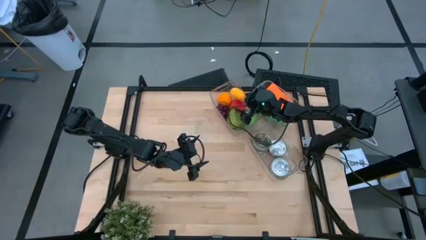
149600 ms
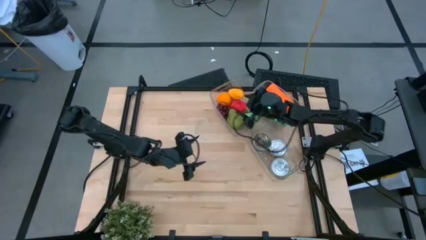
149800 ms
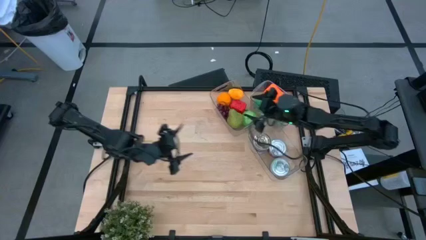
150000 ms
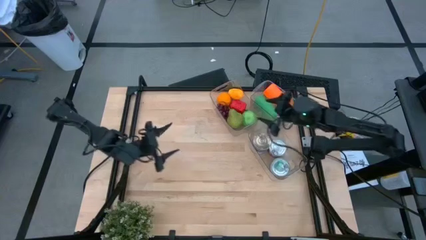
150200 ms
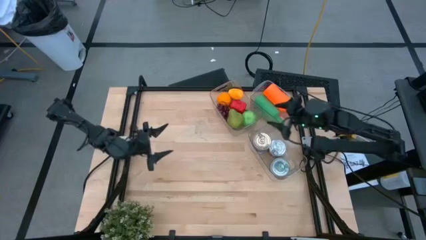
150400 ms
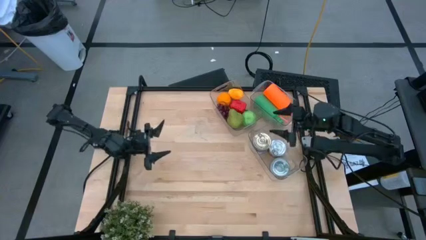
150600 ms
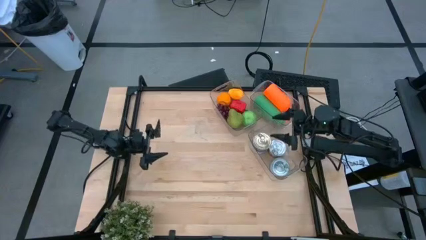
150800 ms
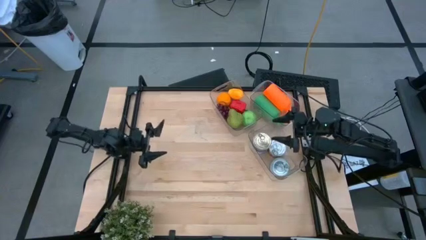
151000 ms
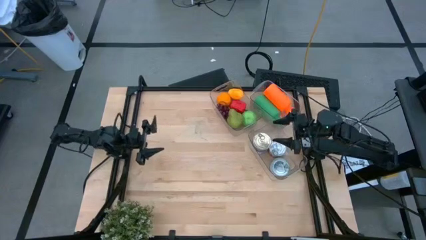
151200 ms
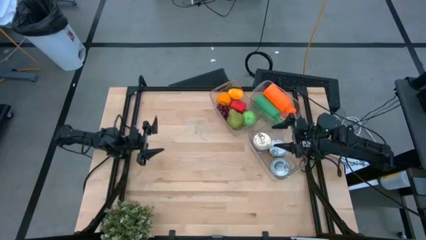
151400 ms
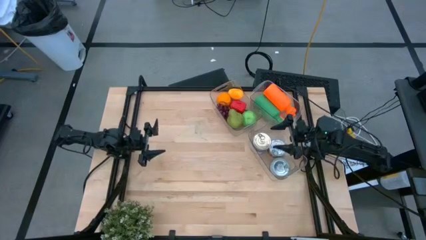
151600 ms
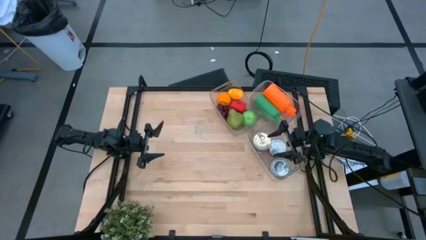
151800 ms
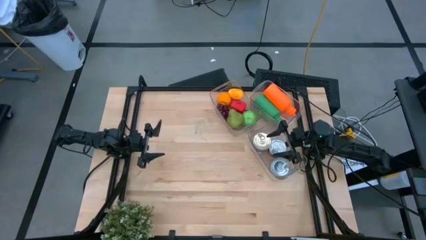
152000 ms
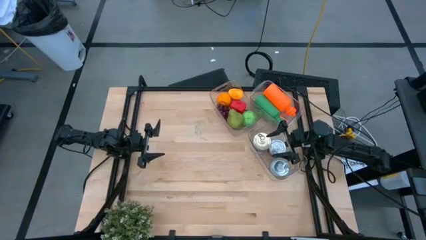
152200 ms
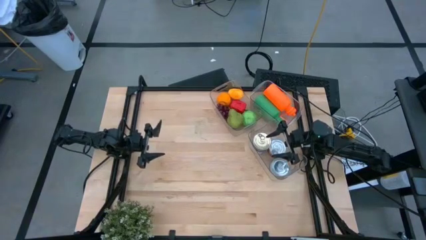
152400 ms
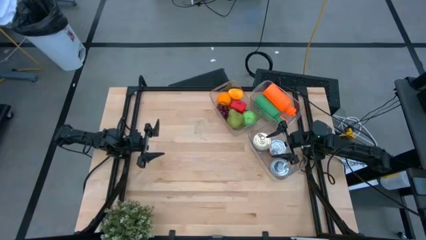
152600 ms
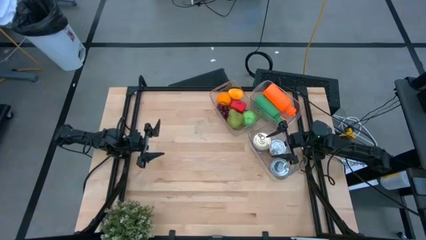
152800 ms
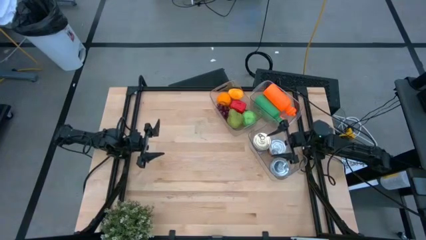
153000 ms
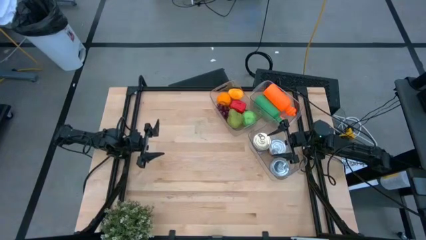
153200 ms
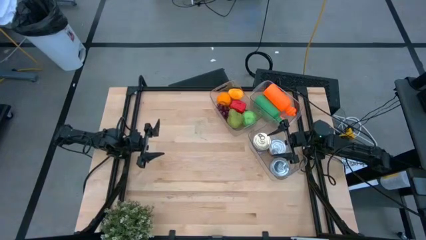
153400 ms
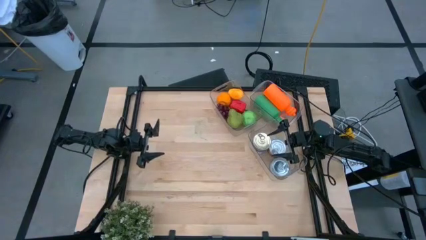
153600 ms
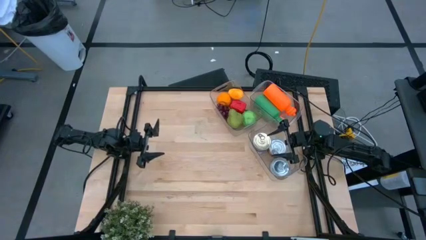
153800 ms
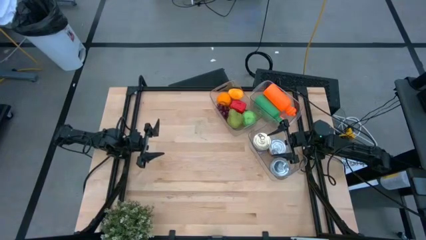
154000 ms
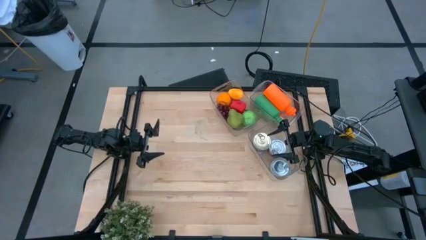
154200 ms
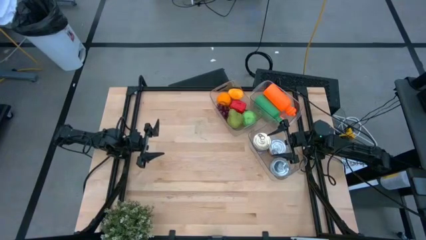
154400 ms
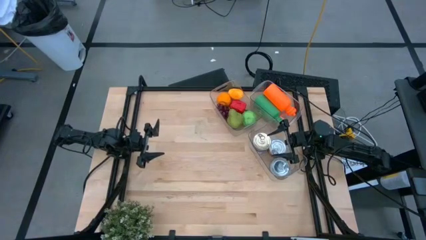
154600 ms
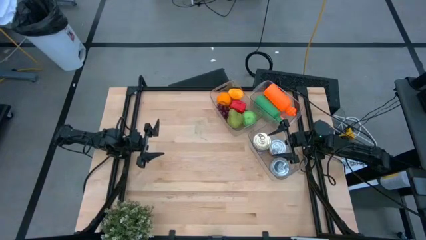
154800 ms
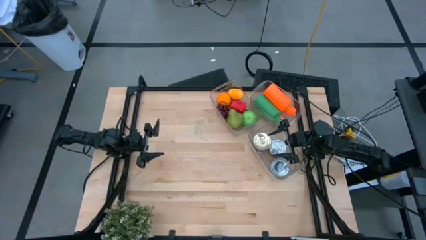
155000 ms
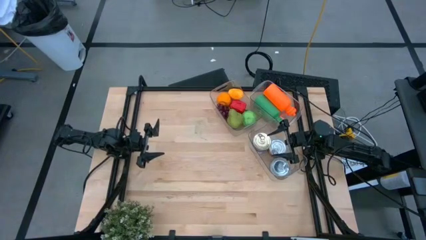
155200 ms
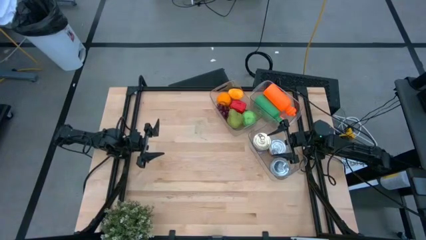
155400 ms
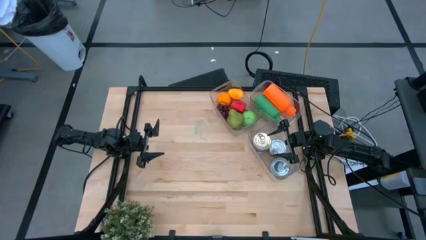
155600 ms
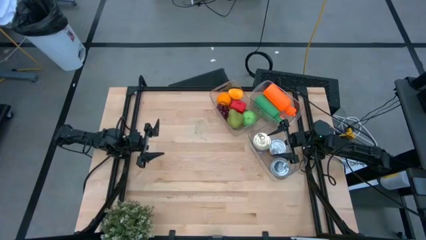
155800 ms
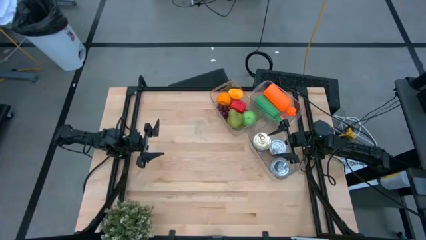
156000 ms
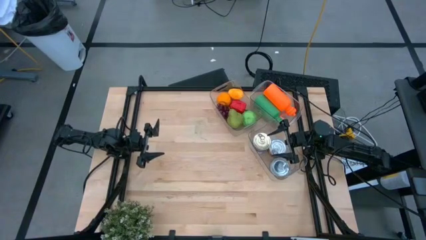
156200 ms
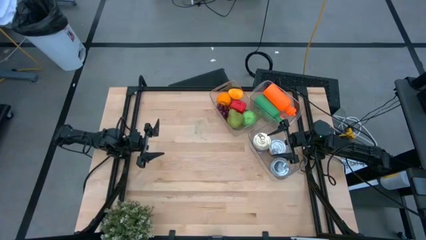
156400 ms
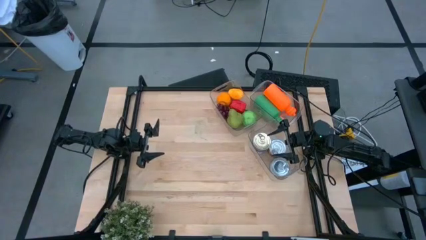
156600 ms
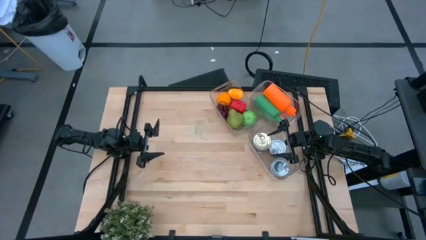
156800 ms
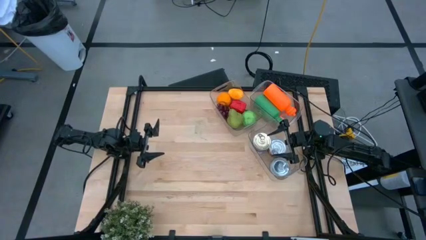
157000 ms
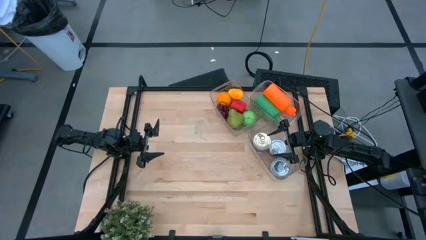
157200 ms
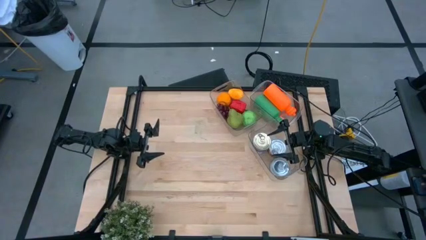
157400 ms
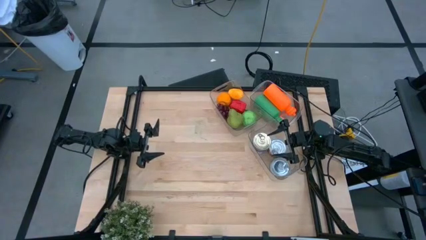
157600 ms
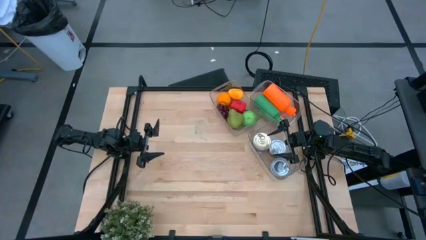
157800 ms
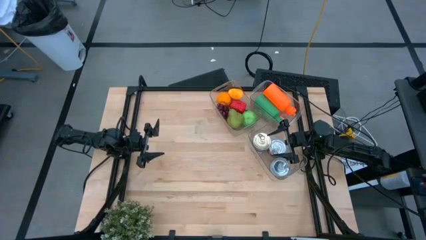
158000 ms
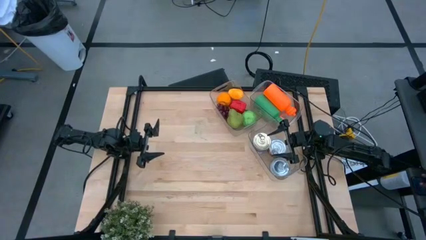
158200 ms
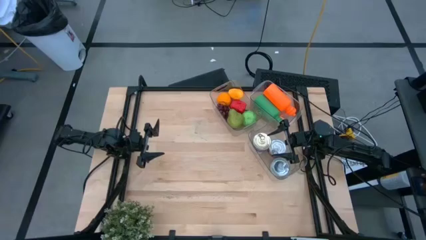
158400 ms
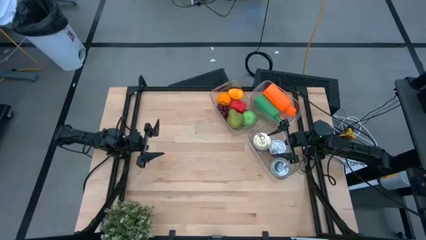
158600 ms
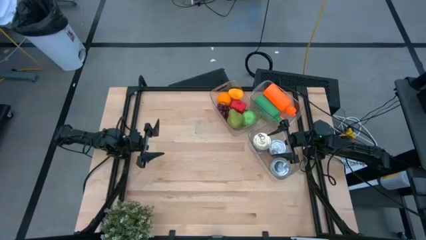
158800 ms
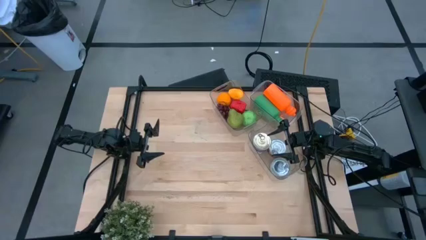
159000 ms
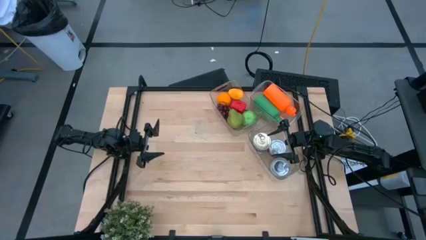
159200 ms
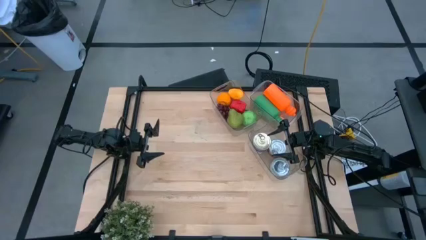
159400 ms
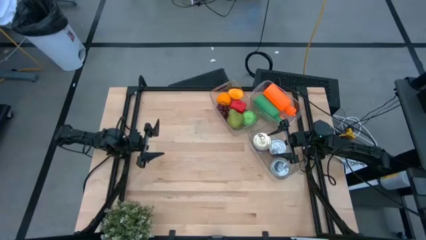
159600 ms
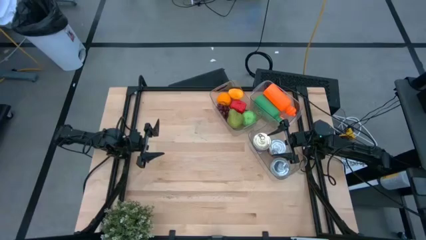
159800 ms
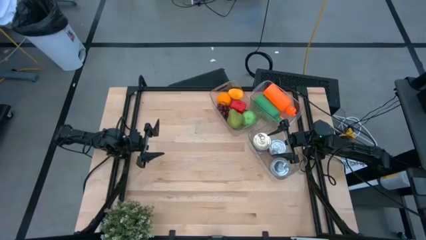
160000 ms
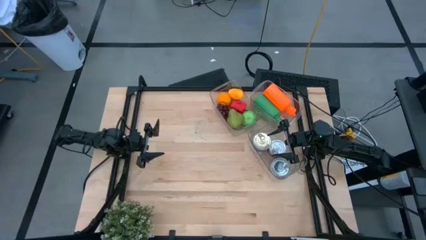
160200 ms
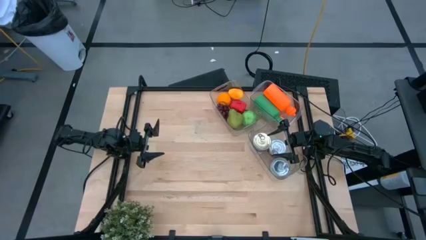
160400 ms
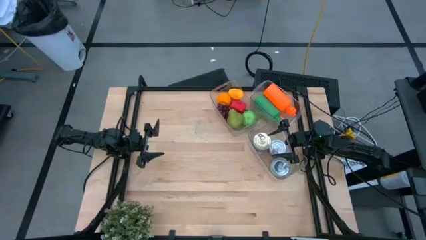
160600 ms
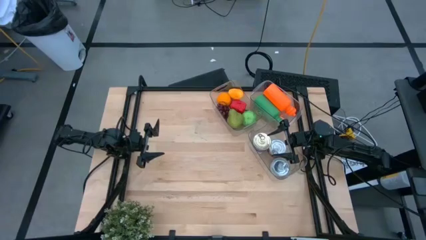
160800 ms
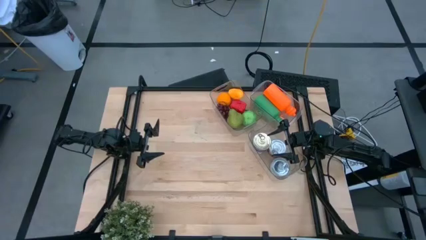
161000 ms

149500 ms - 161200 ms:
Task: Pick & Place Food Item
Return to Home Position

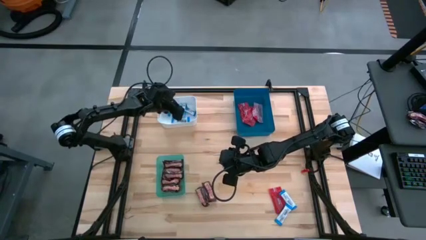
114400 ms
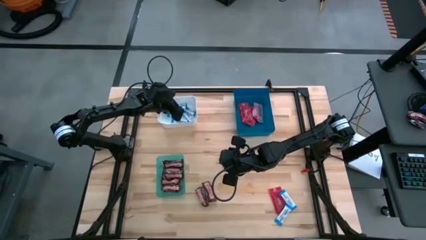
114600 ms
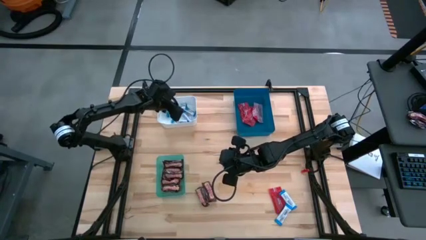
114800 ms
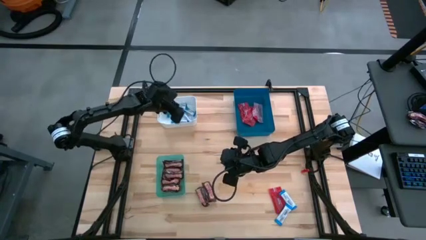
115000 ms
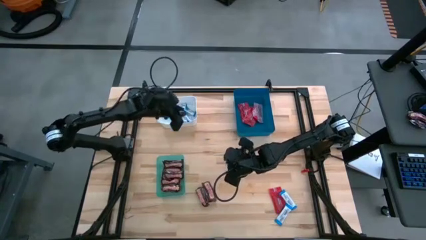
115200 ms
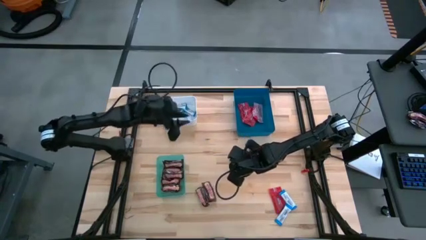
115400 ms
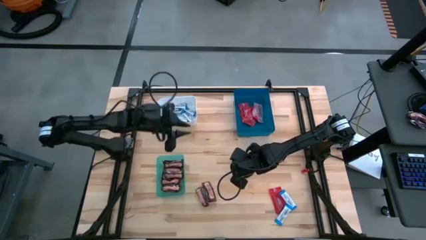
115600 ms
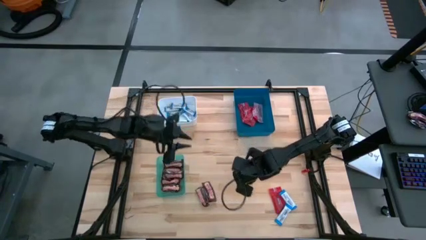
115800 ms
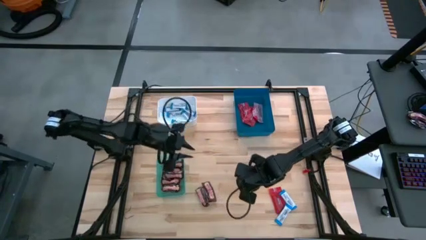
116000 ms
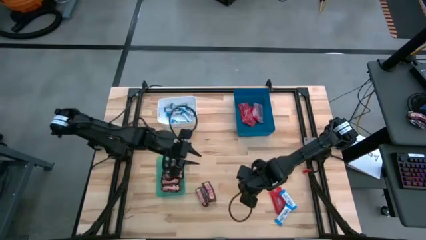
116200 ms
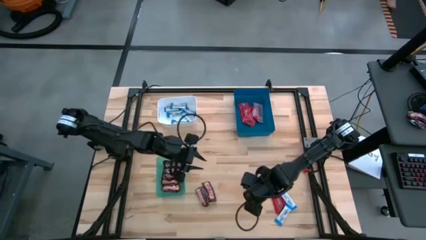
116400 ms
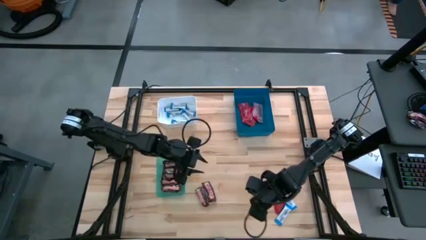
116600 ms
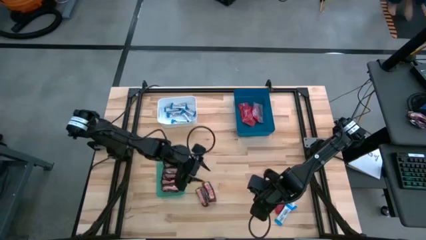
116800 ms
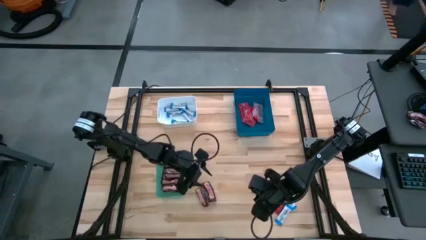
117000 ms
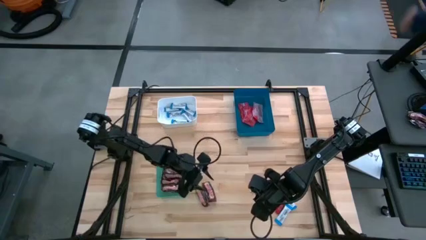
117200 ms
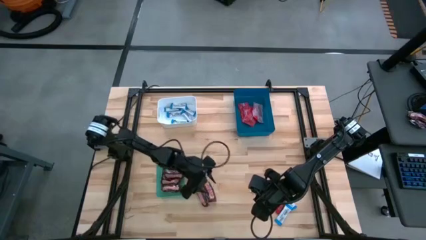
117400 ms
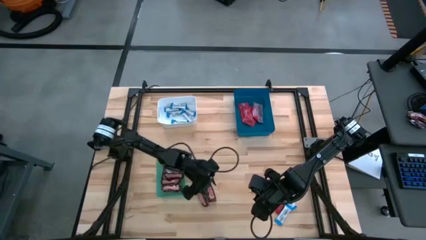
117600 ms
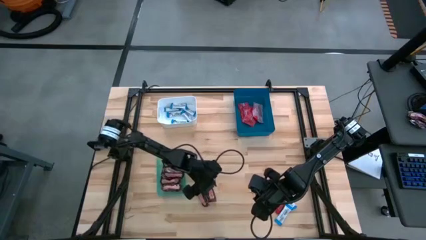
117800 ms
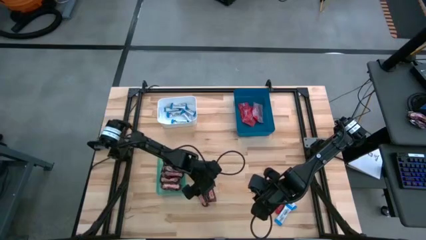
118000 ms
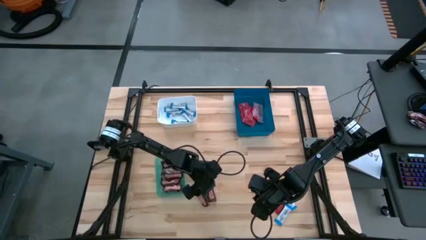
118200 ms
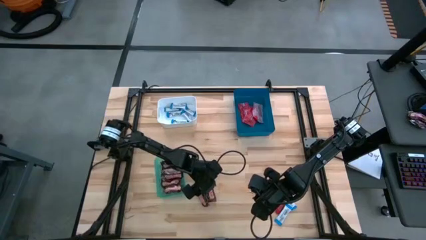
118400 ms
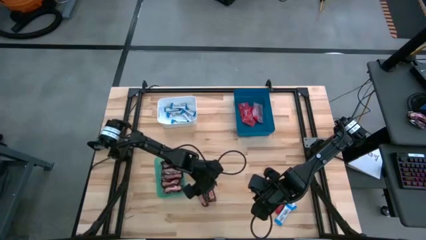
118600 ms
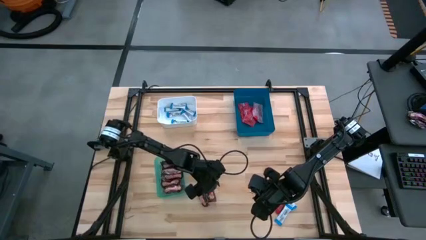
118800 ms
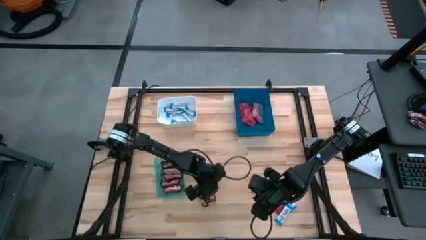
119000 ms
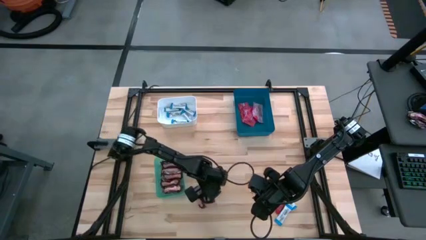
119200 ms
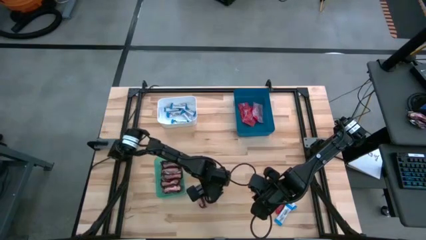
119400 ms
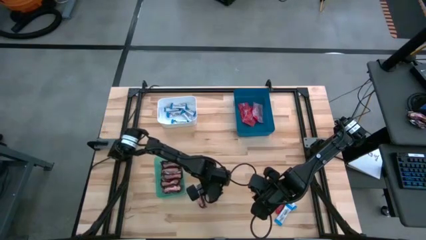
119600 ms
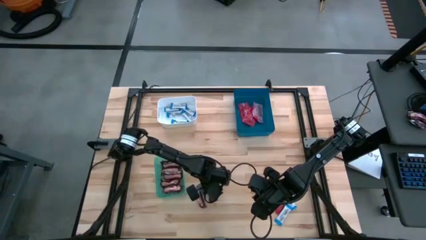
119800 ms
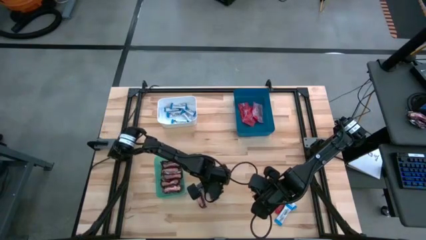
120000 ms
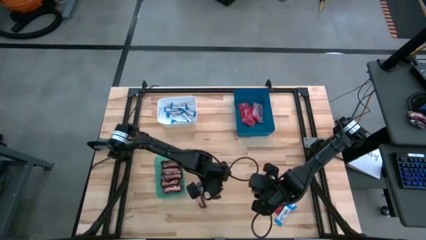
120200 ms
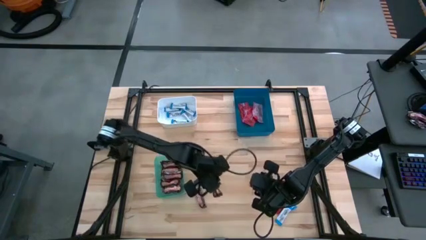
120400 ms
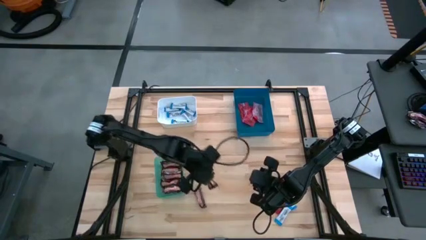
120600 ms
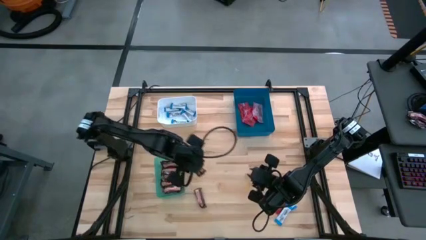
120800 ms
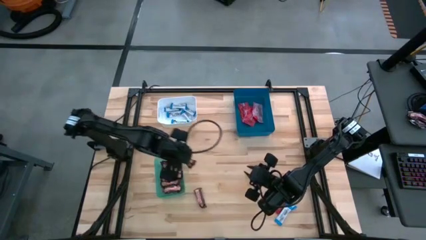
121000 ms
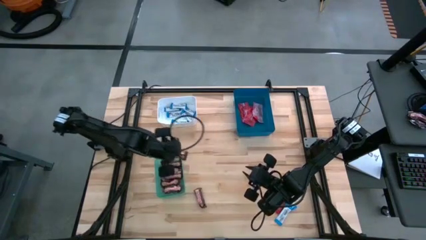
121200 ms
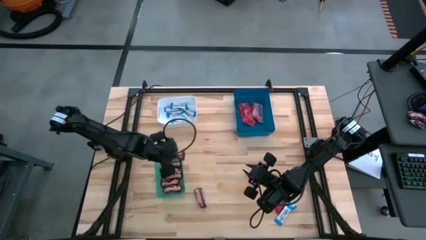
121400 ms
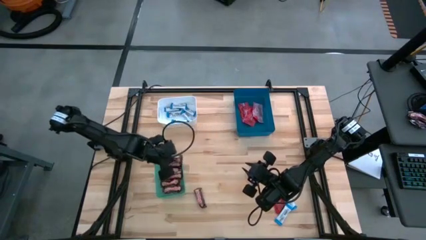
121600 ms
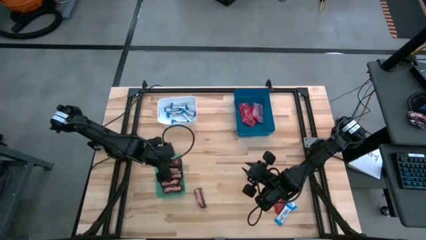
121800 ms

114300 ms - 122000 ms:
Task: Sort candy
Put the brown chocolate bar into the green bin
